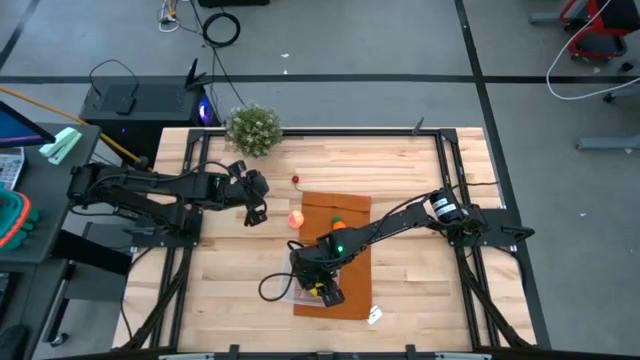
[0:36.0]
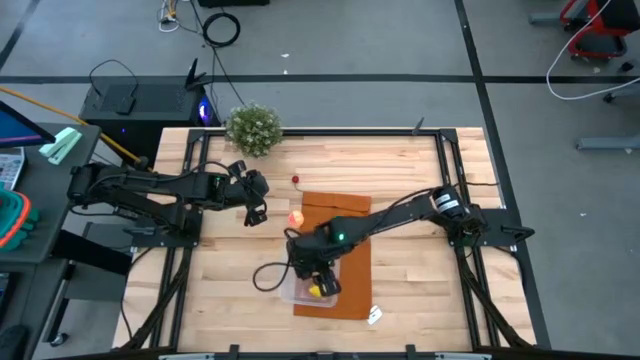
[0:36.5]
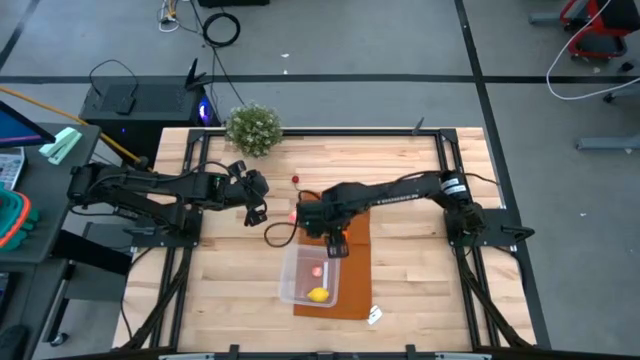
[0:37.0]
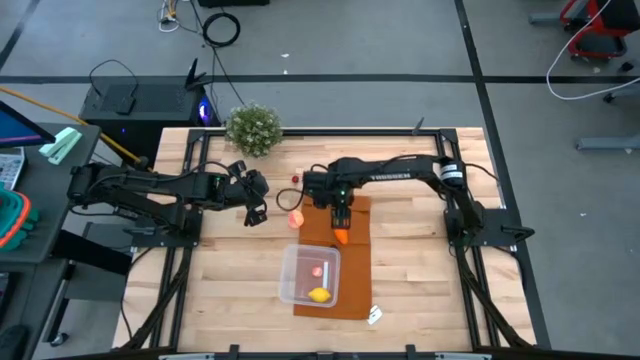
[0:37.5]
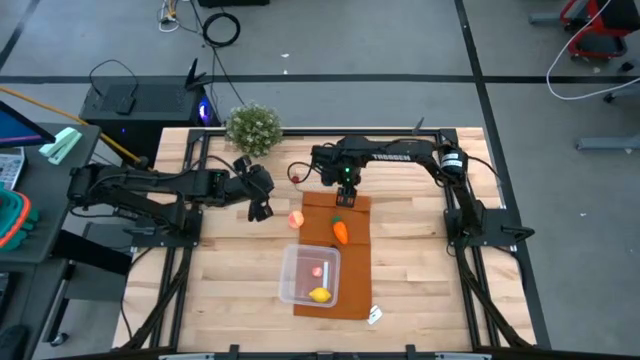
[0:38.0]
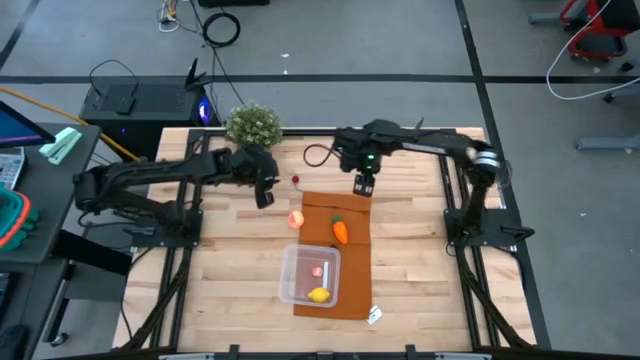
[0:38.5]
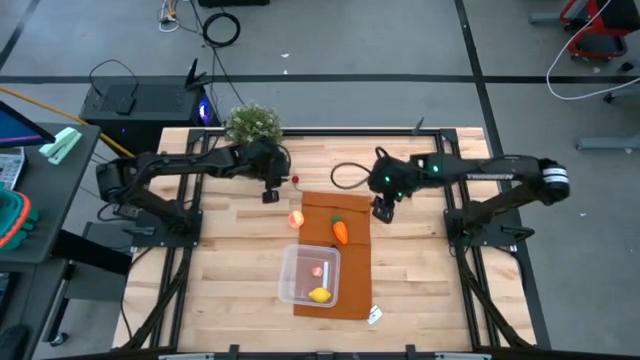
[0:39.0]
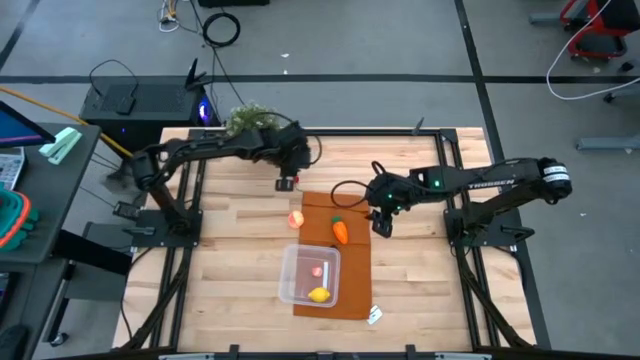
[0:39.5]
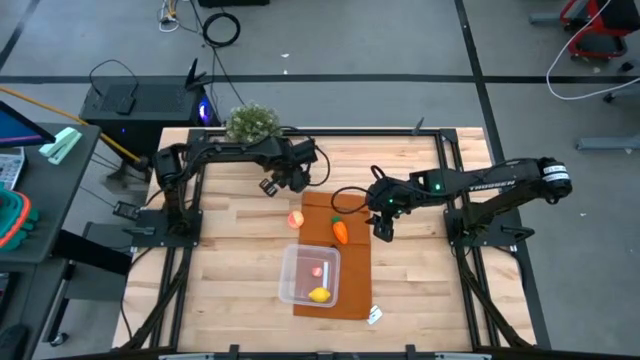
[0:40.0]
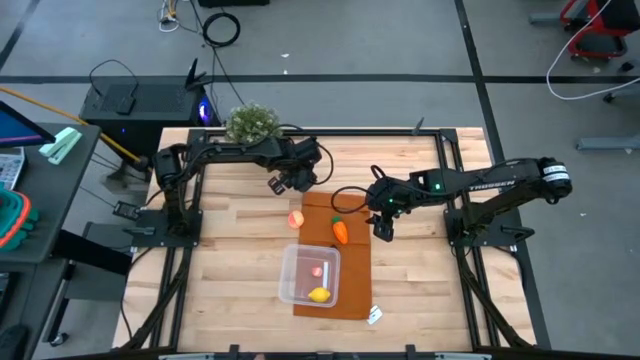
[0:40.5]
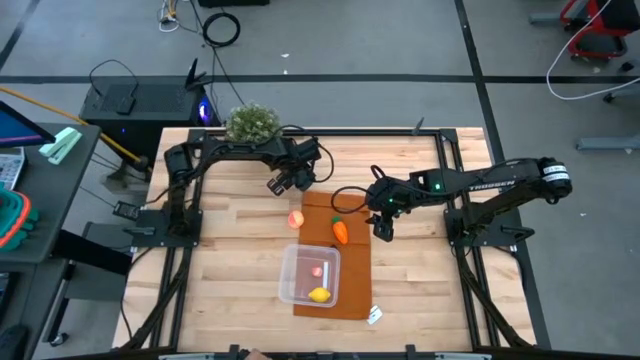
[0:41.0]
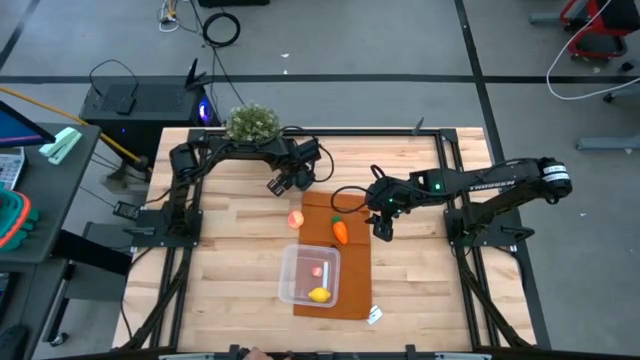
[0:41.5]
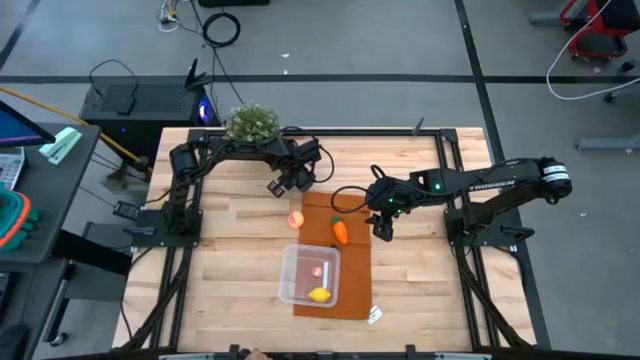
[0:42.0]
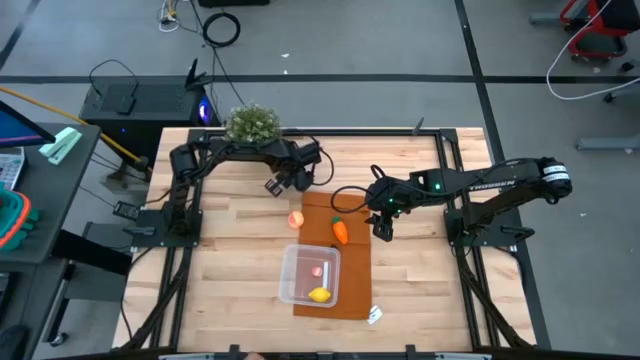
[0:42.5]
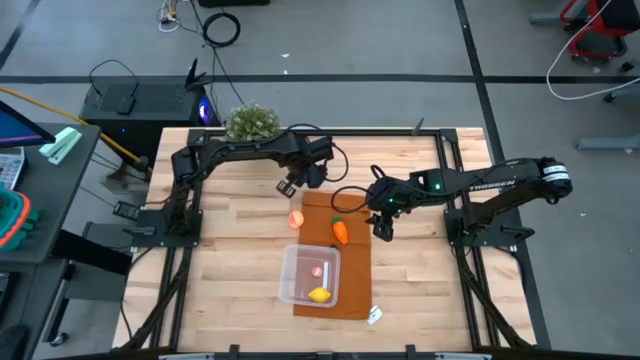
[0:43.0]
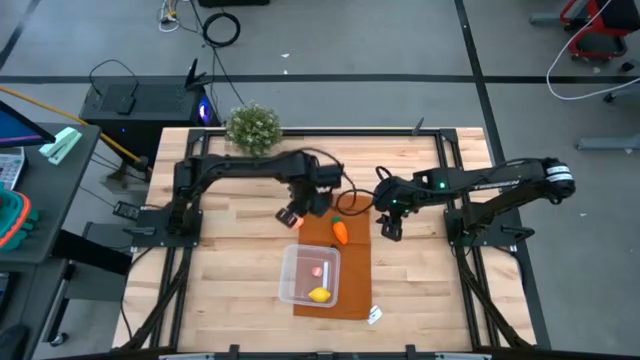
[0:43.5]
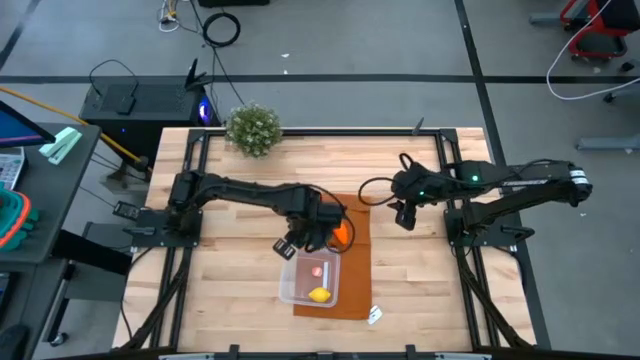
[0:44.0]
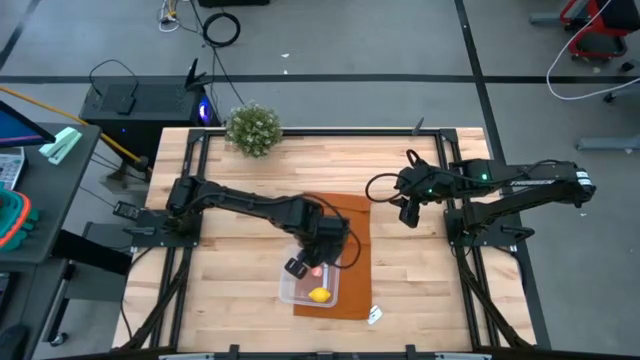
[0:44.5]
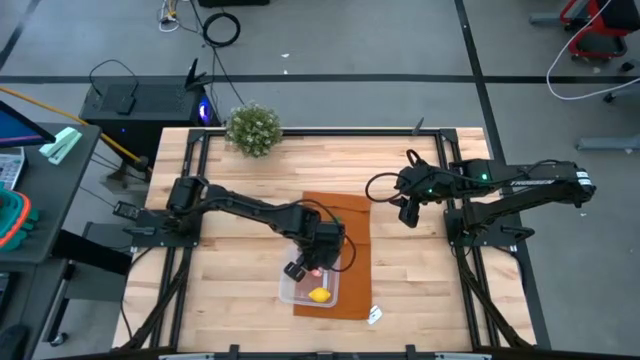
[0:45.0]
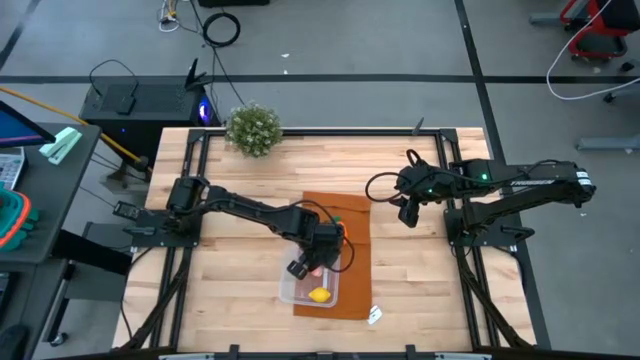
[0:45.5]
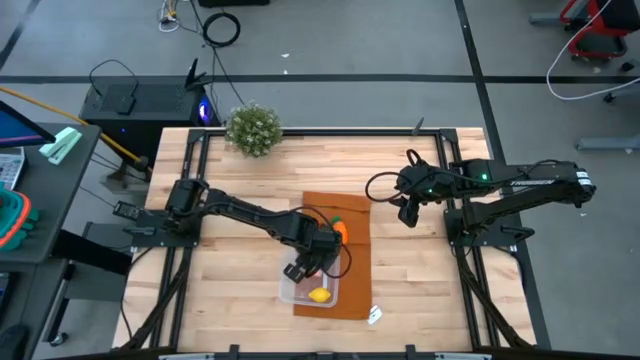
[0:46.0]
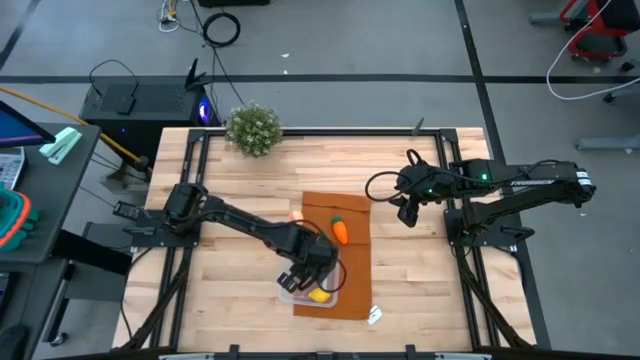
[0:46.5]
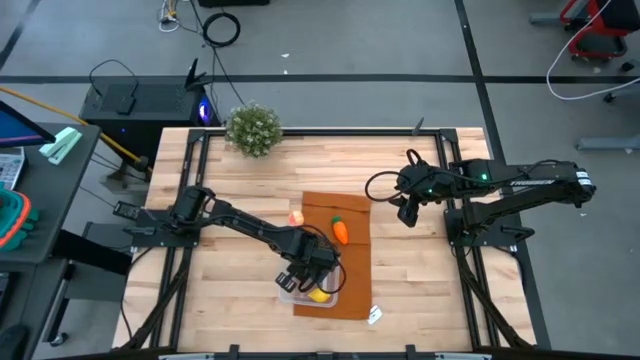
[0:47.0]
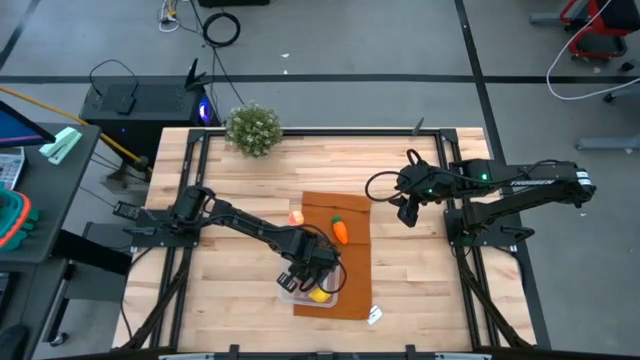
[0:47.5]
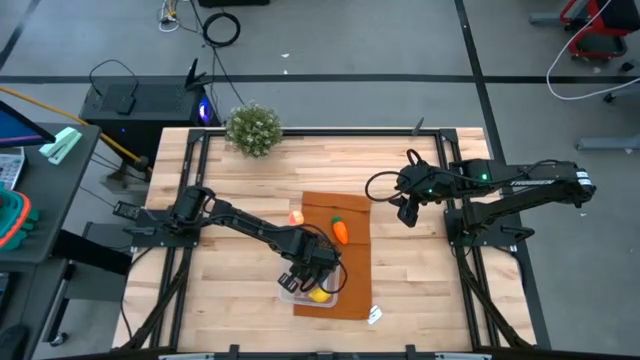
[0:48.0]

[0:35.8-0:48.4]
Task: Pick and placing Produce into tupperware
Put the red cherry into the transparent bin

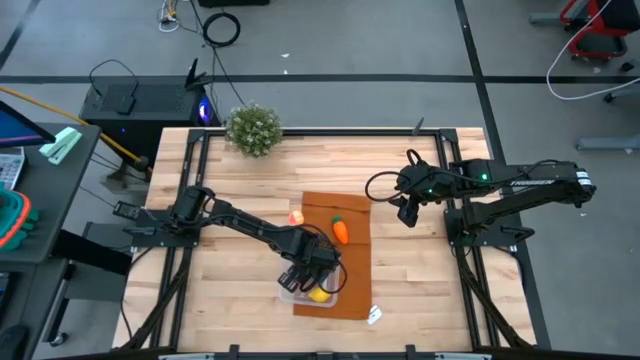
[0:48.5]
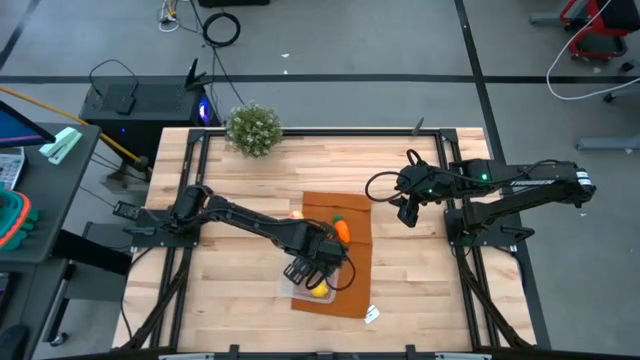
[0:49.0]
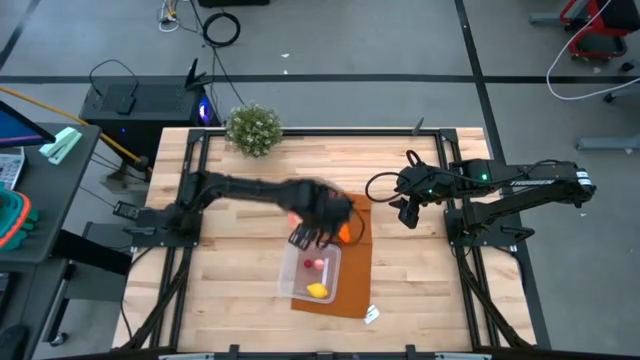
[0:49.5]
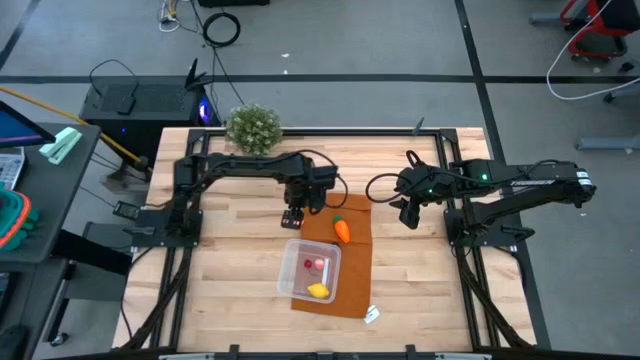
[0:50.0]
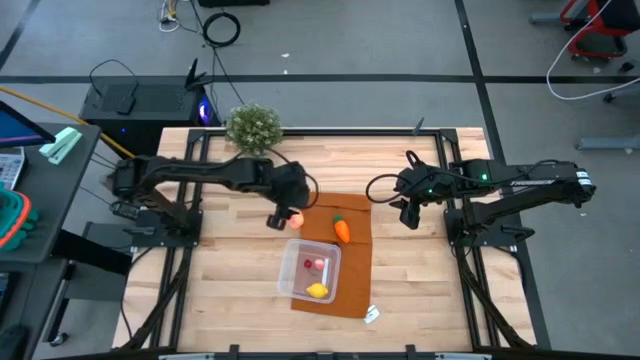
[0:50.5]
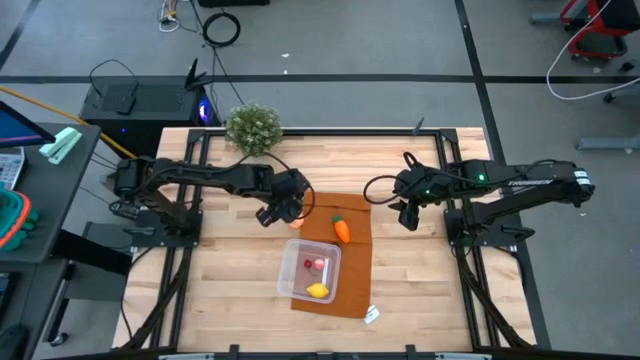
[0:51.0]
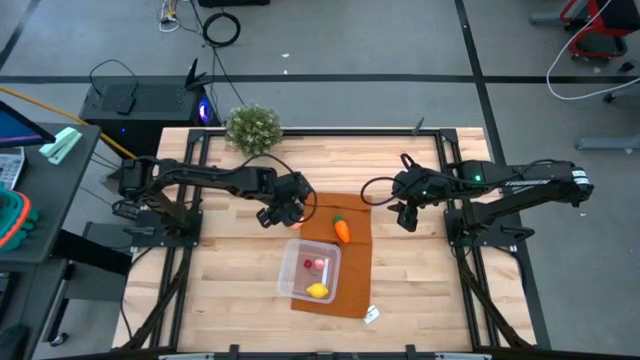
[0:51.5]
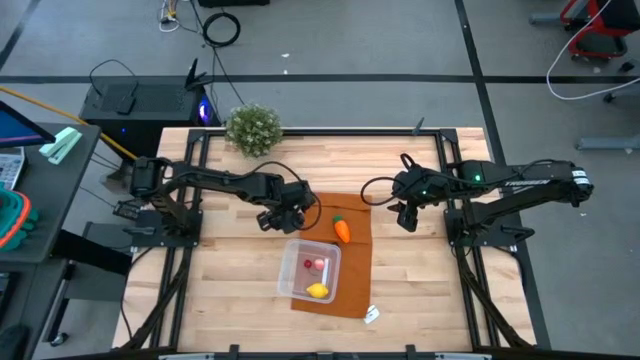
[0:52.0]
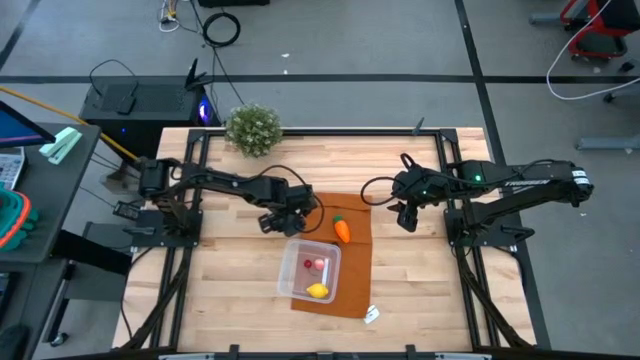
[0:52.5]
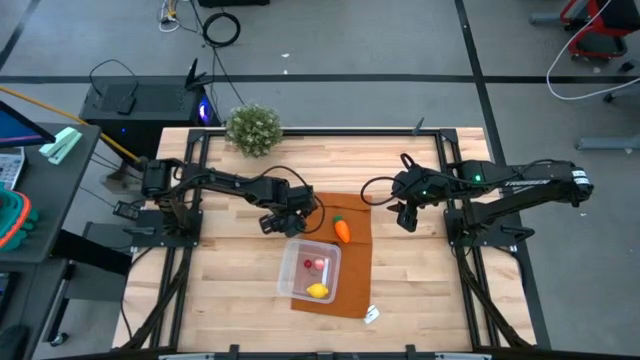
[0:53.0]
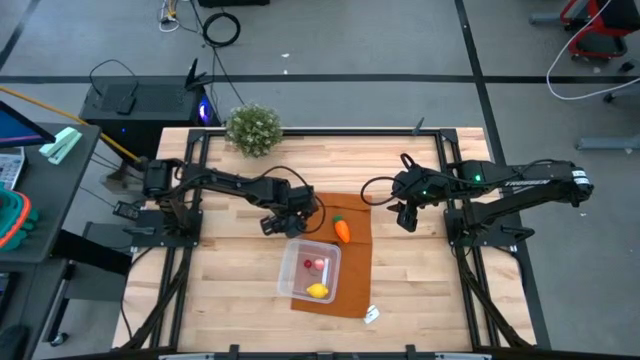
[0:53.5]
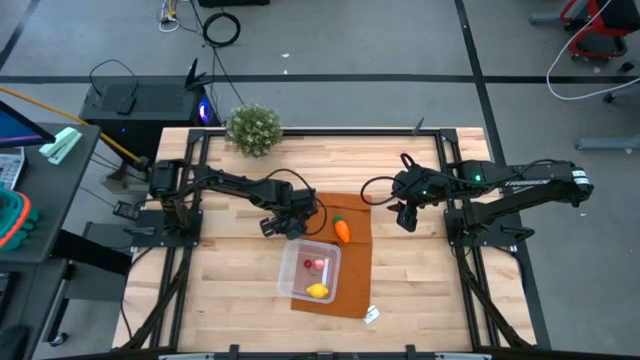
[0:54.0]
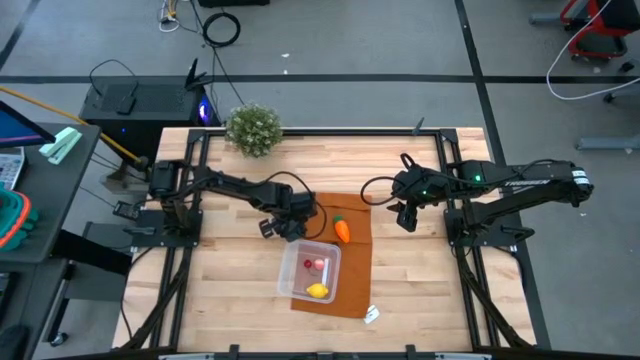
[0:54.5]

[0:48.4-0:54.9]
Put the large pink peach into the transparent bin

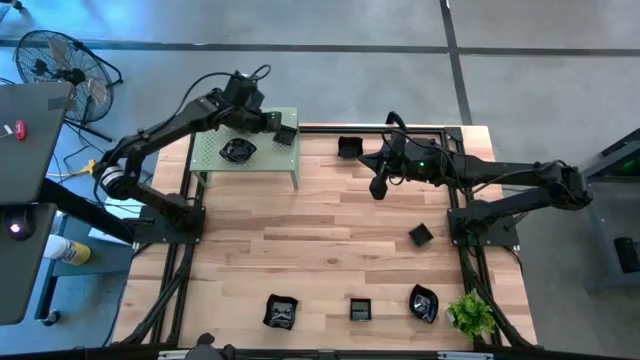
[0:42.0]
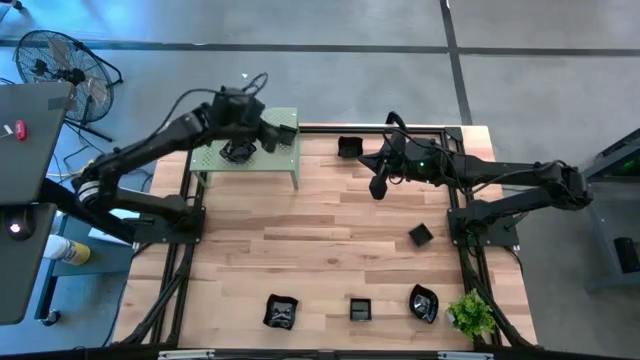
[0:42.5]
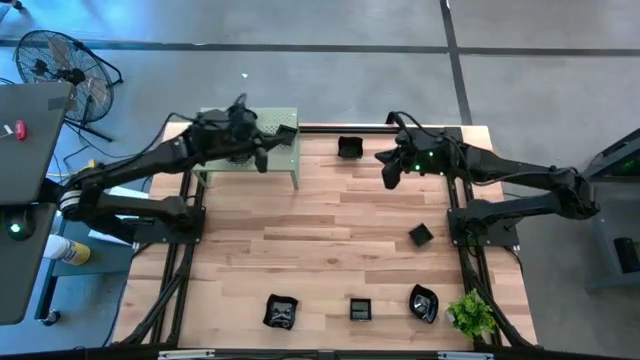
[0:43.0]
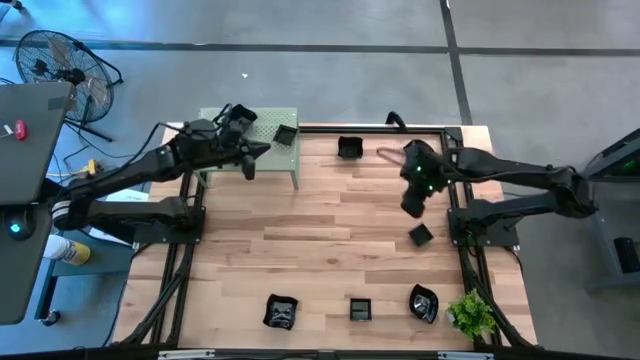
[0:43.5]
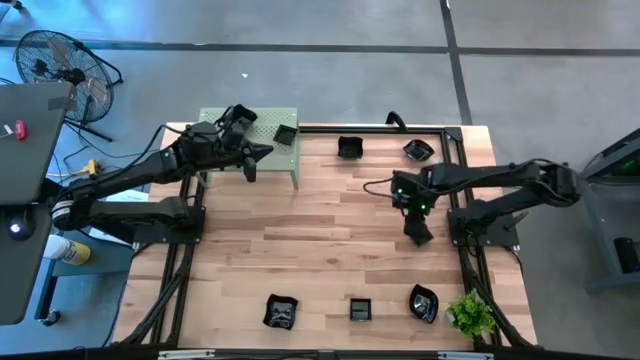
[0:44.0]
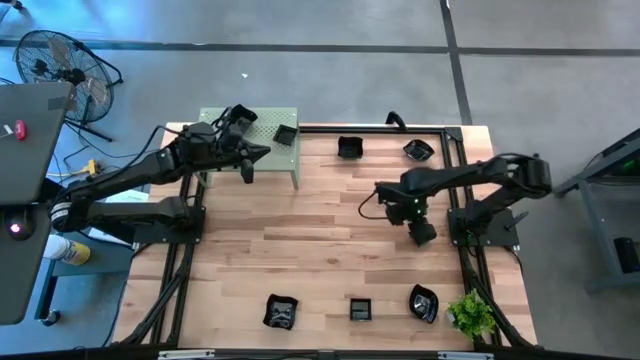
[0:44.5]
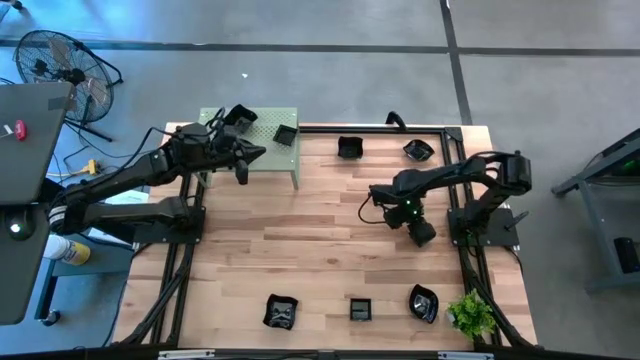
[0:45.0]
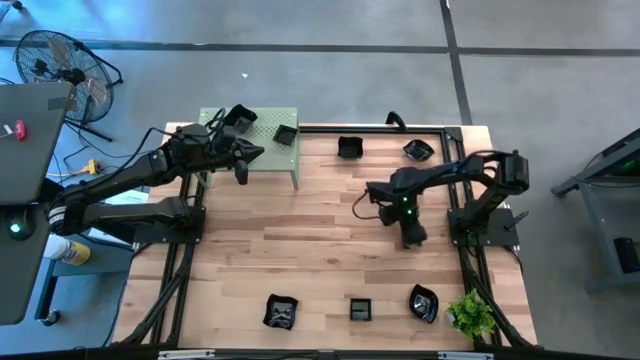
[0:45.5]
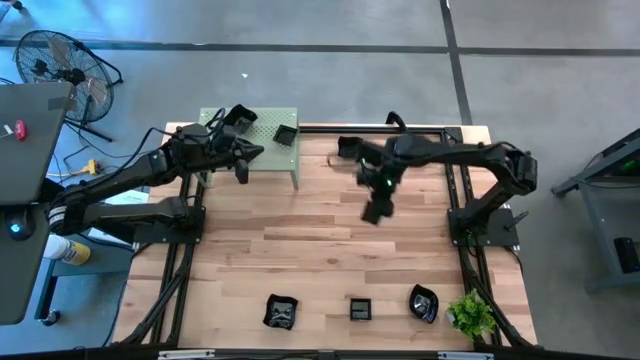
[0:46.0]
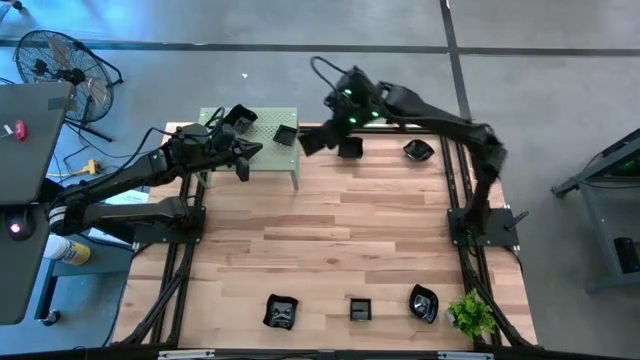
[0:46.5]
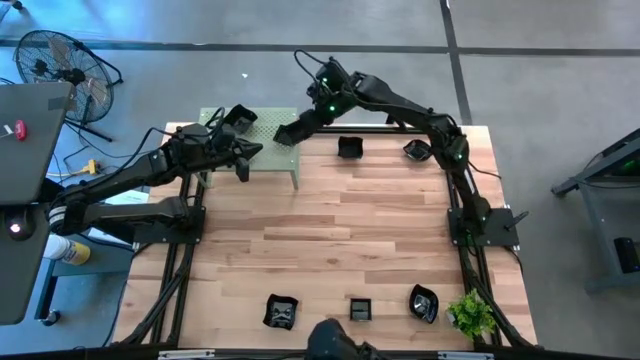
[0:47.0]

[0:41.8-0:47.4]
Task: Pick & Place Mini shaped plates
Stack the black square plate on top of the stacked black square plate on the shelf
